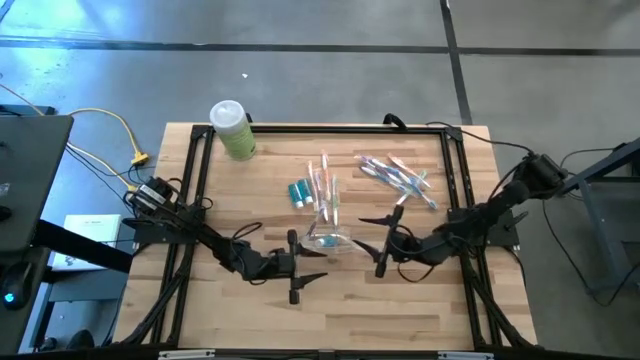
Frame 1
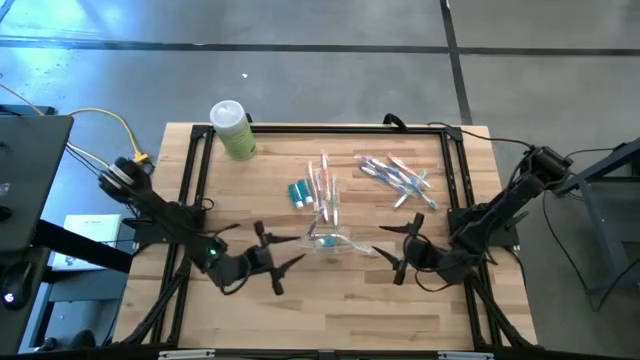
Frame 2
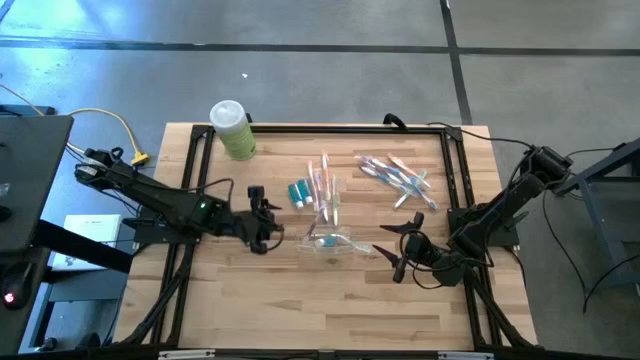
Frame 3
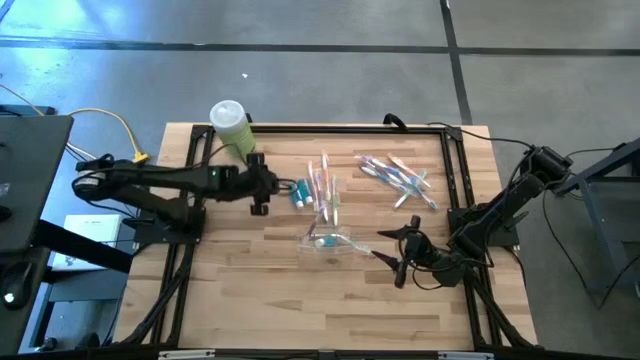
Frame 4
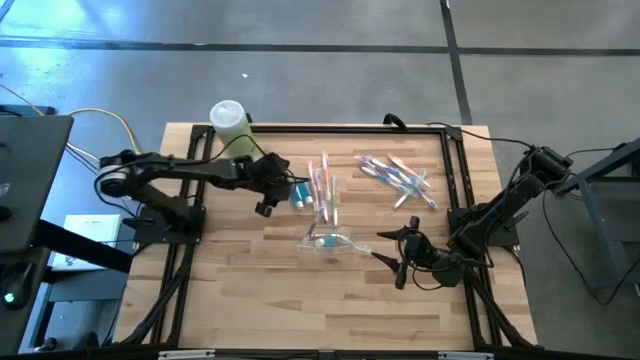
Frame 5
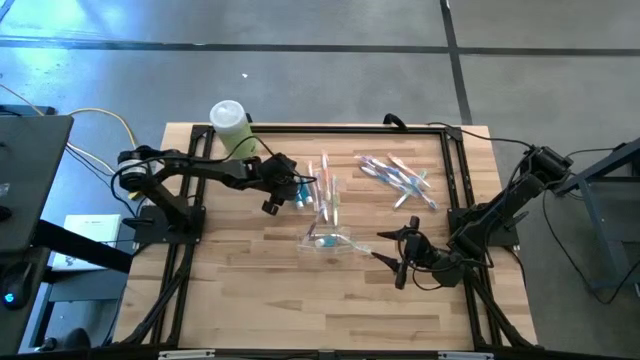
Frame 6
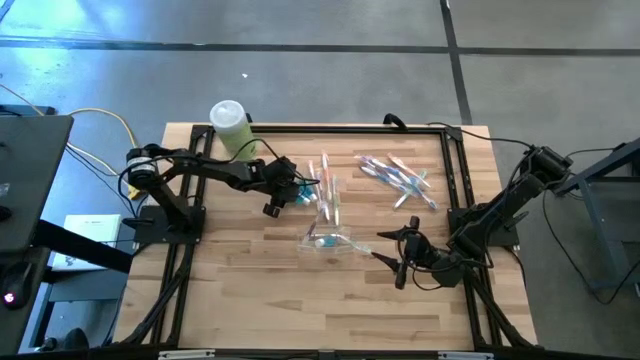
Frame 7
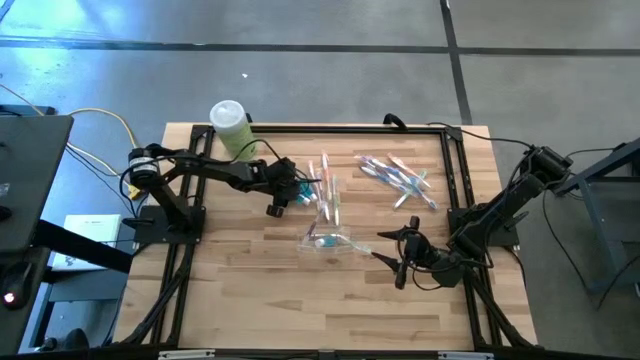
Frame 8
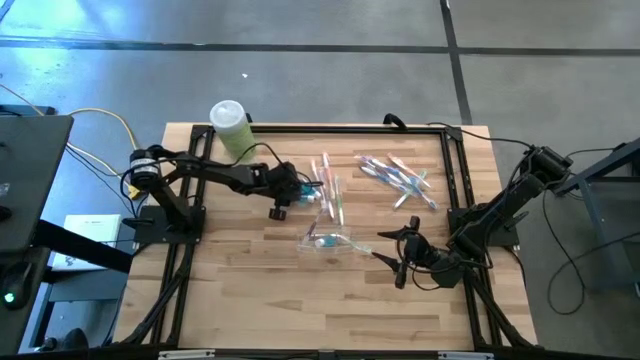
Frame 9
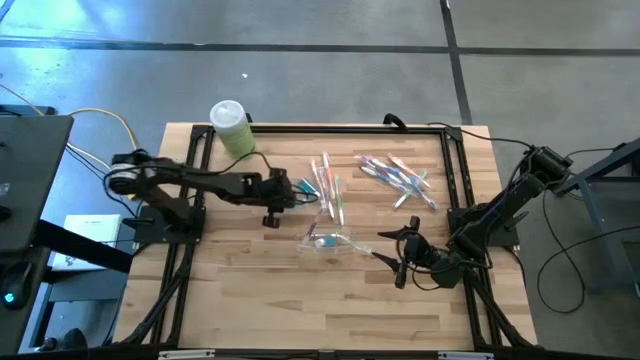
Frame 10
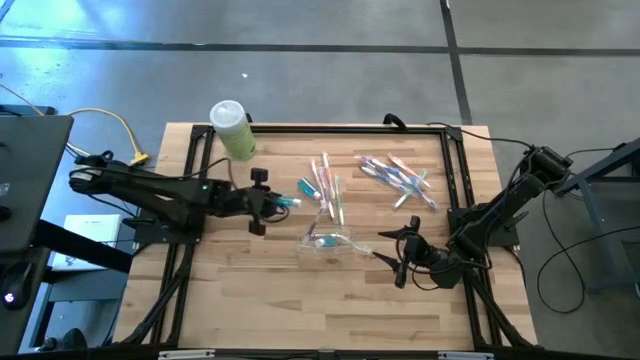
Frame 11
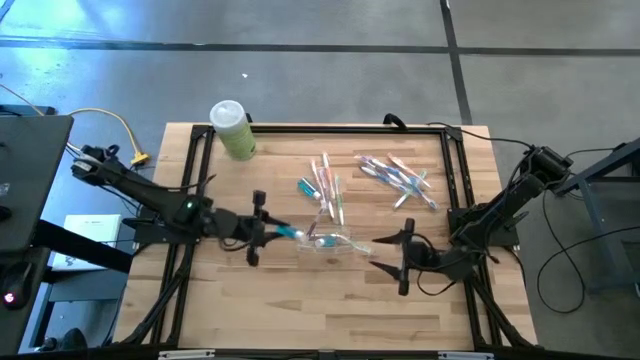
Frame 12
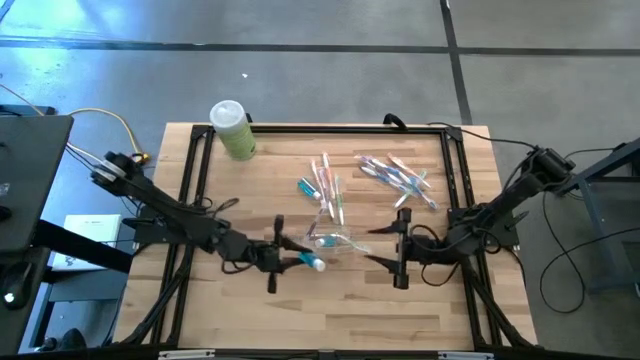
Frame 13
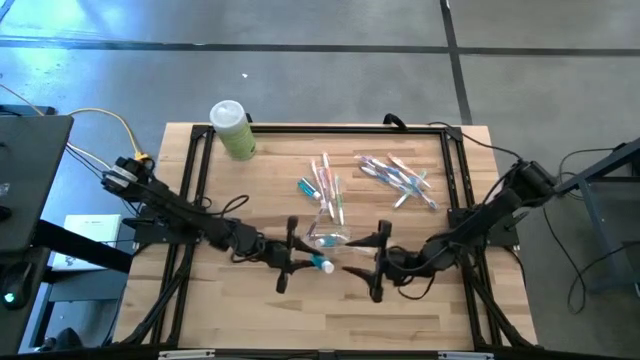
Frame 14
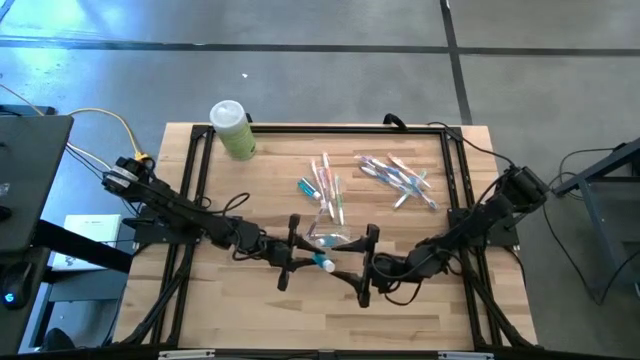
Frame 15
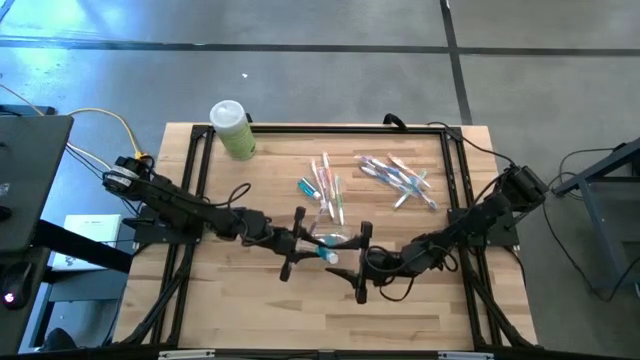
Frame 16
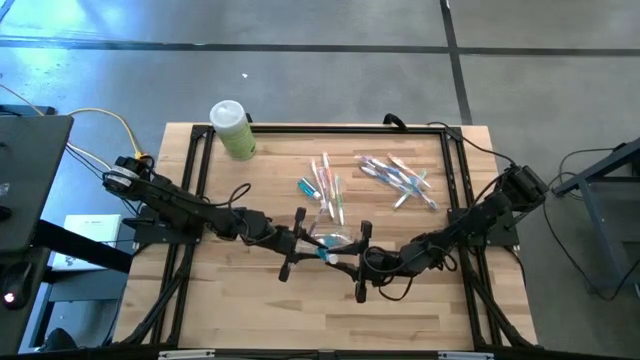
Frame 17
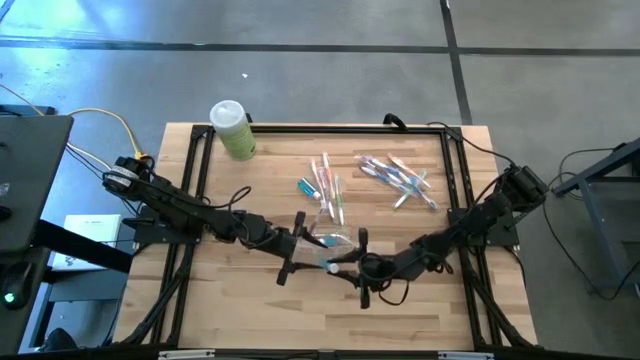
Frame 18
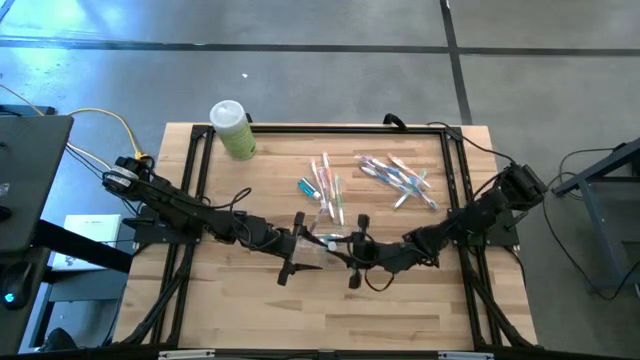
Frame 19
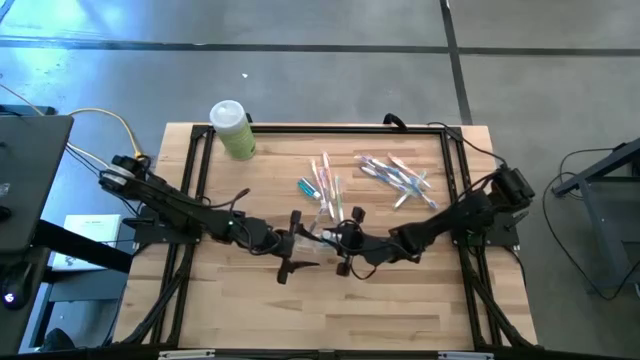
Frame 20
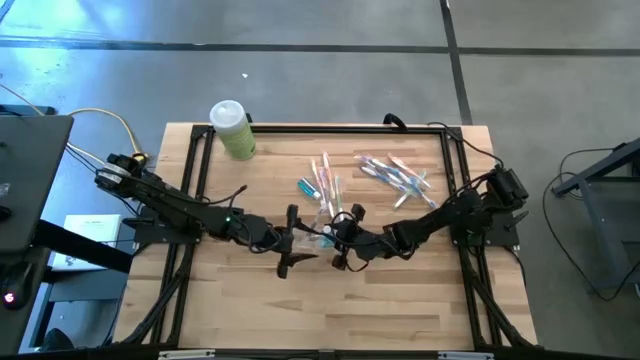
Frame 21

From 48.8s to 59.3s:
Task: Pick & Place toothbrushing station
Put the mouthwash into the transparent organizer

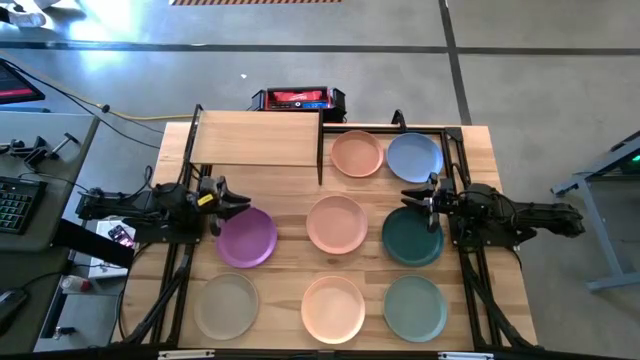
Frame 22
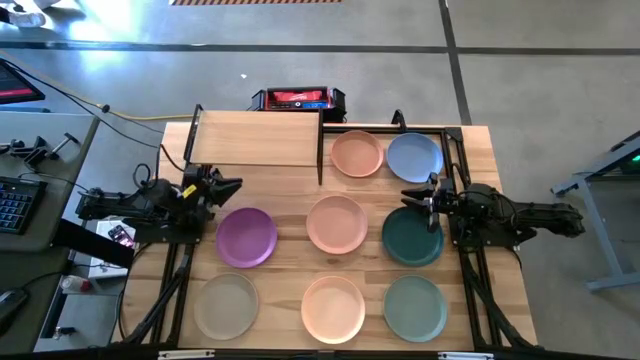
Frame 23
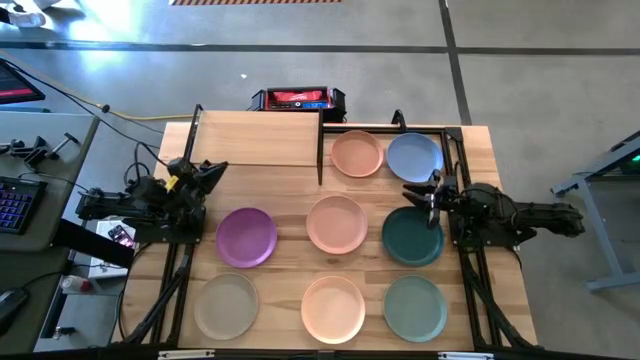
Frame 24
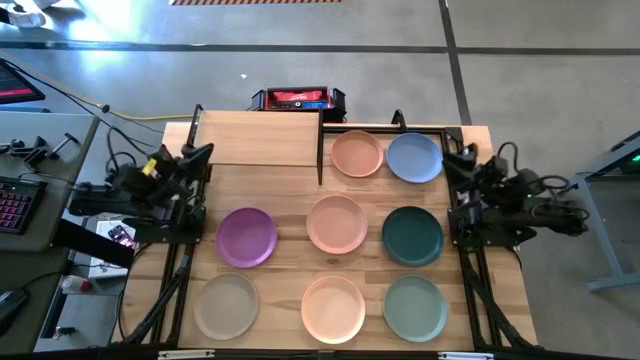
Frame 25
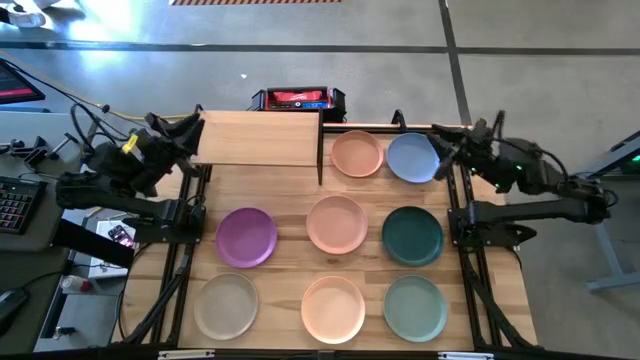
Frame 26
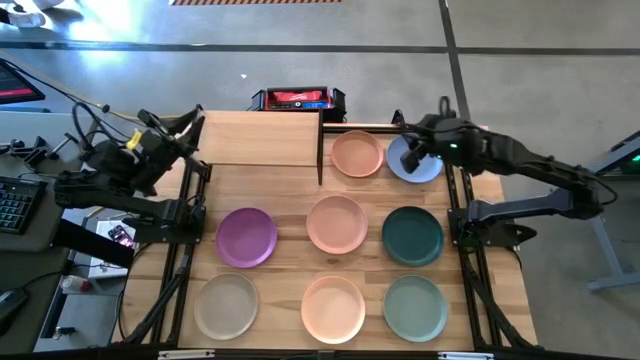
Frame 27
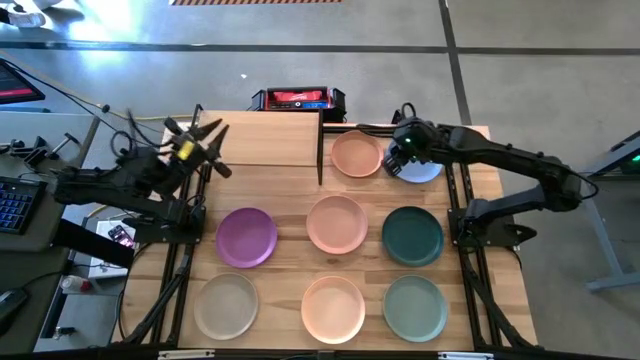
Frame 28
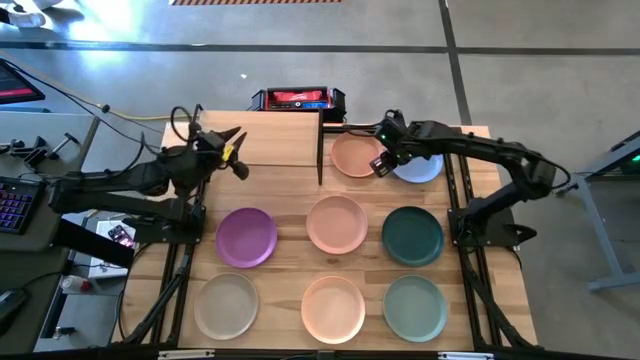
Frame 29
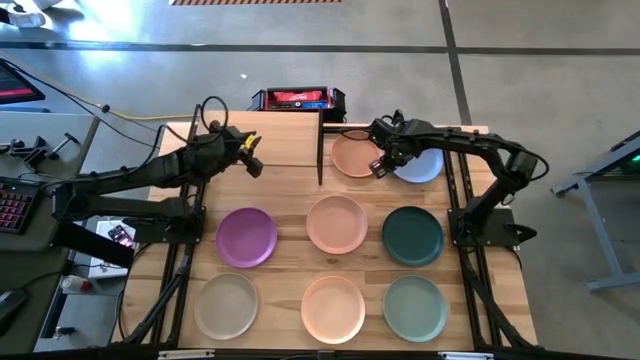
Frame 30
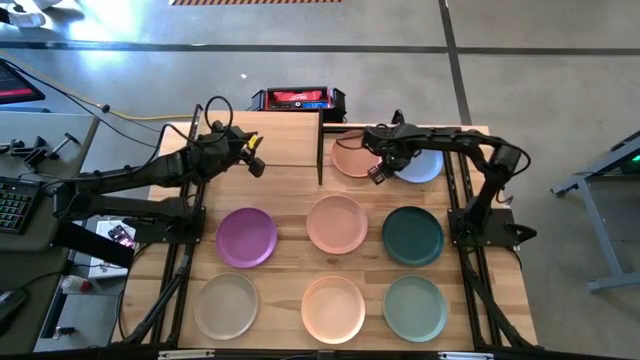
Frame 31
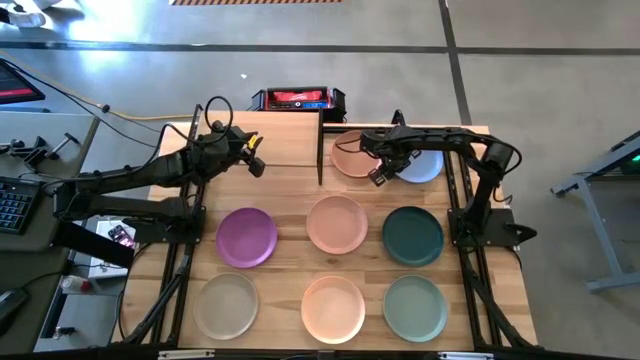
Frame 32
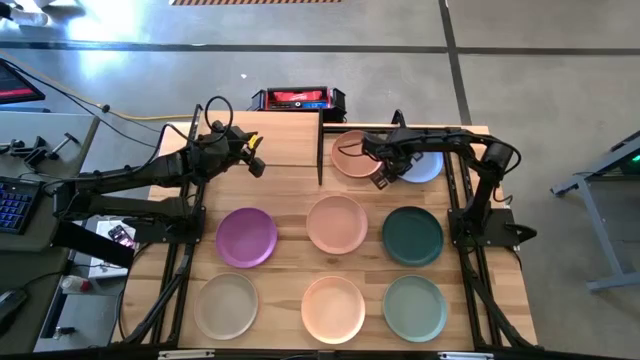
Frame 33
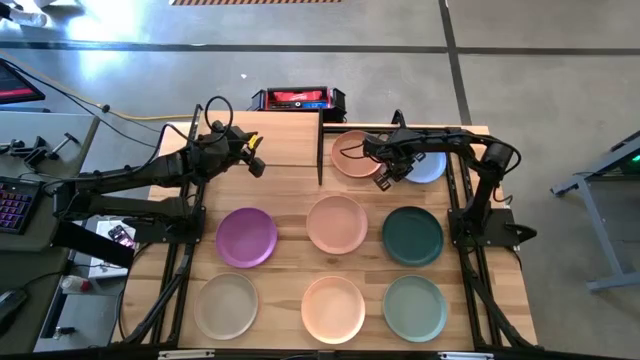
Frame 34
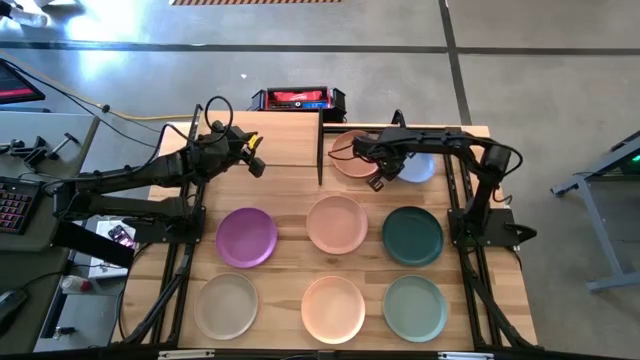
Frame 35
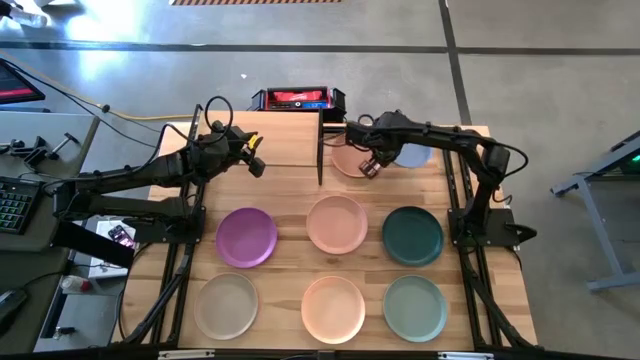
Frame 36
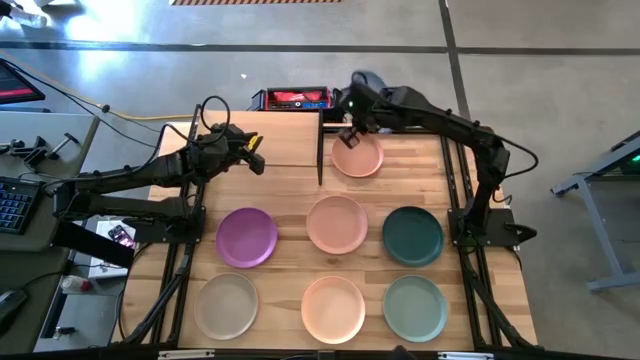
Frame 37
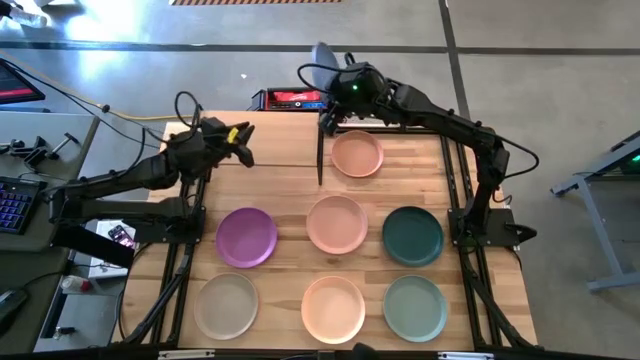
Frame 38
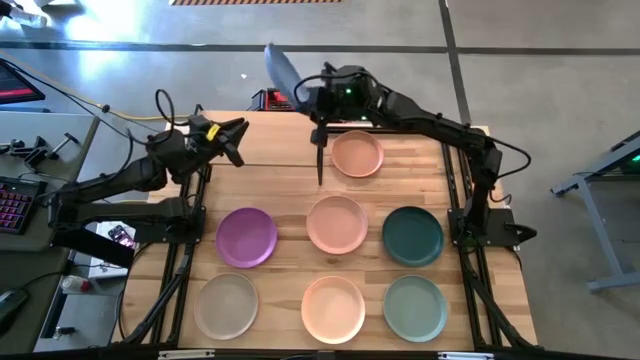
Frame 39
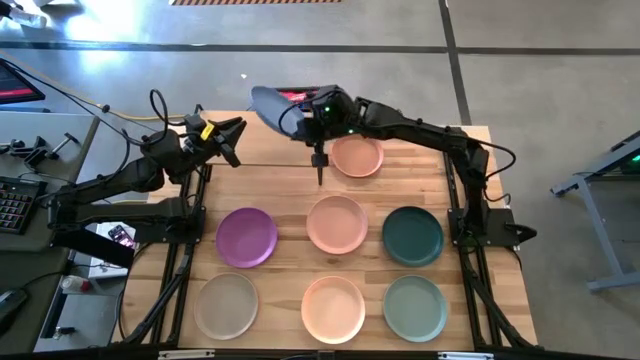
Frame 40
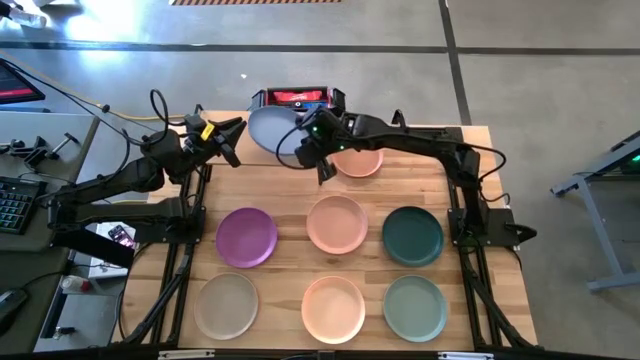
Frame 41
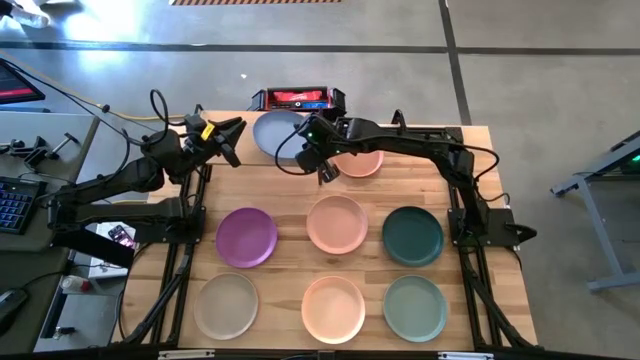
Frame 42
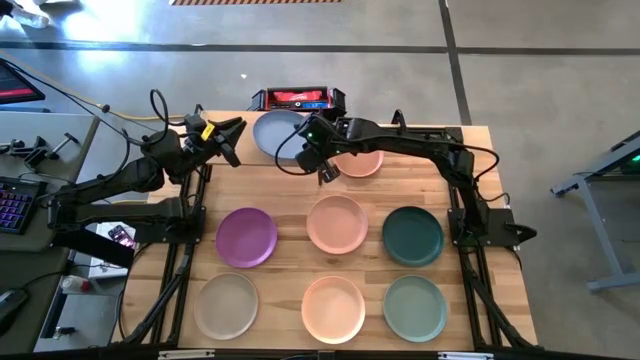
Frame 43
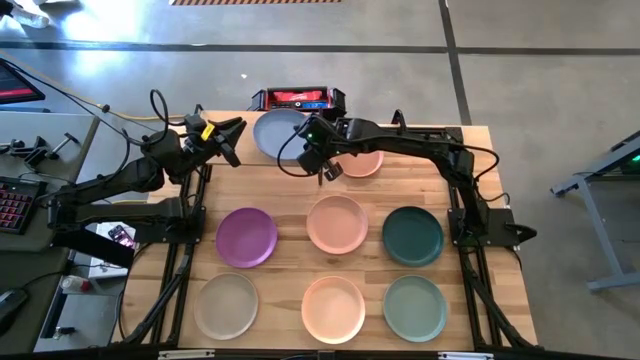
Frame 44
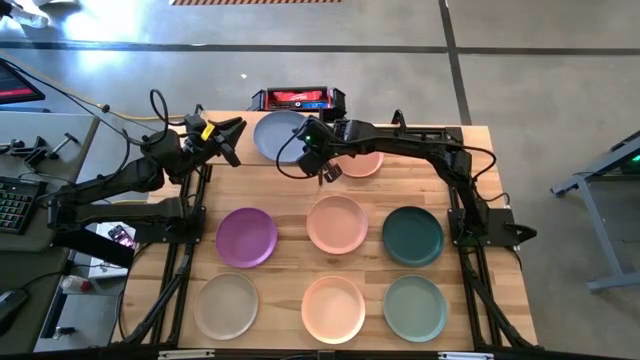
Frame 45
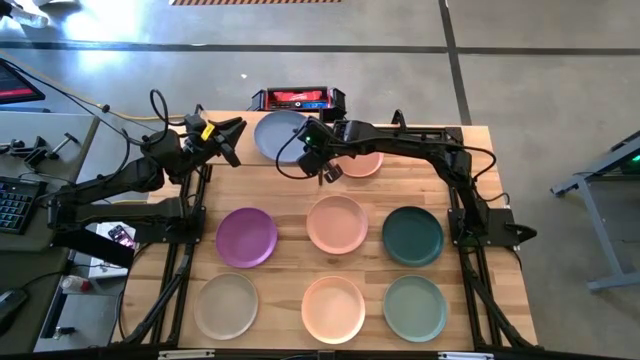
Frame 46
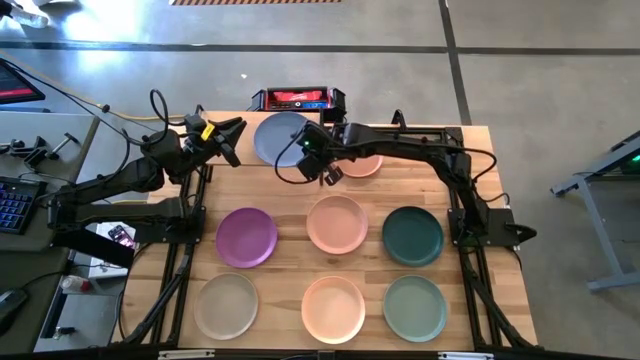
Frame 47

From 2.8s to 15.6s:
Task: Place and stack plates onto a shelf
Put the light blue plate on the shelf
